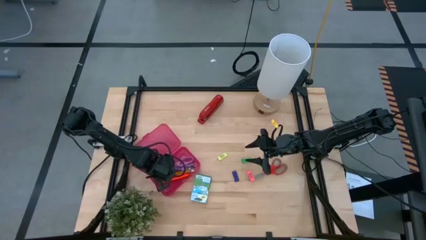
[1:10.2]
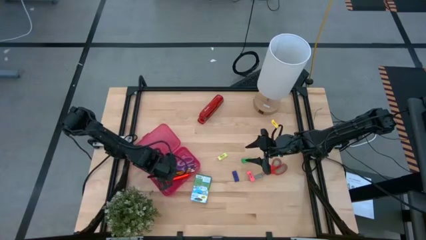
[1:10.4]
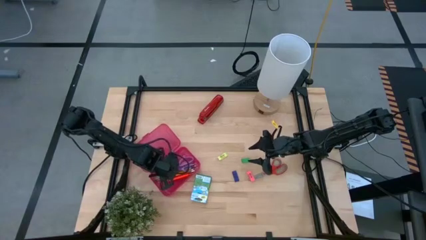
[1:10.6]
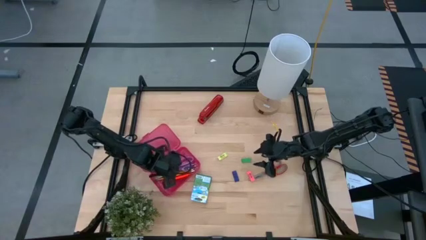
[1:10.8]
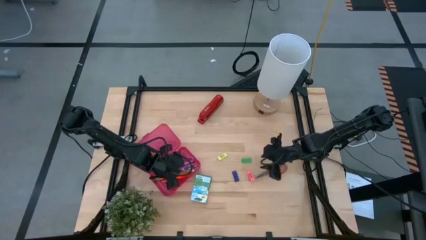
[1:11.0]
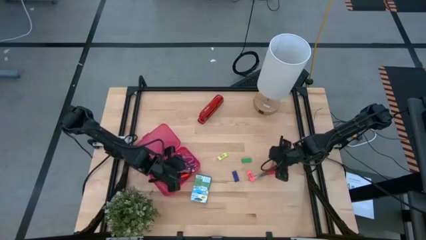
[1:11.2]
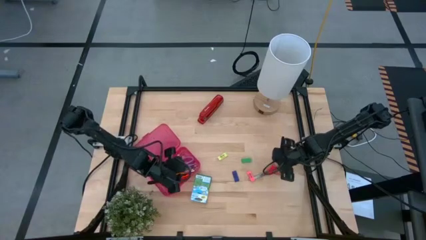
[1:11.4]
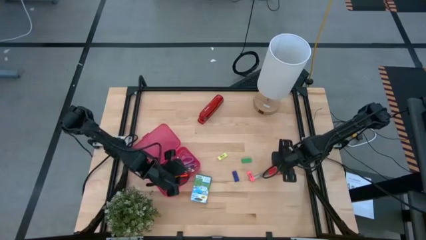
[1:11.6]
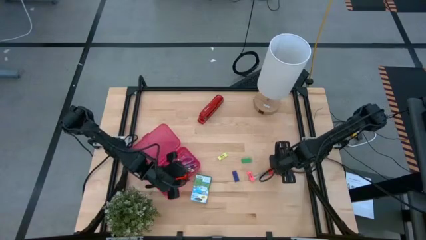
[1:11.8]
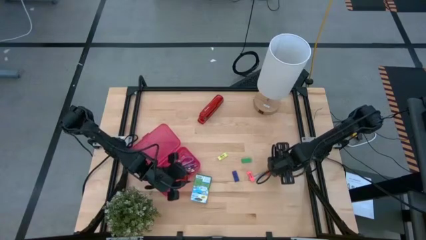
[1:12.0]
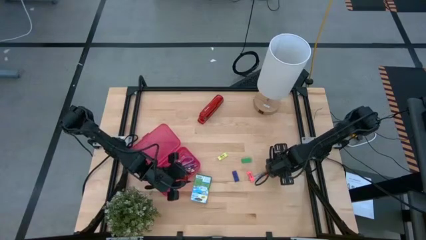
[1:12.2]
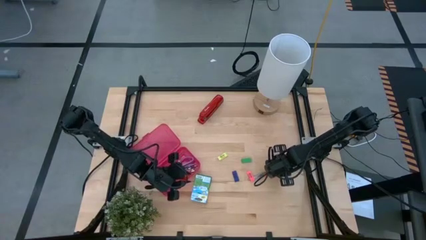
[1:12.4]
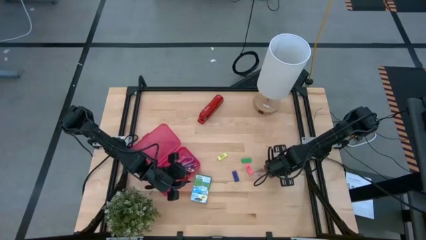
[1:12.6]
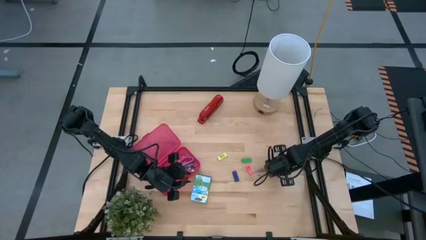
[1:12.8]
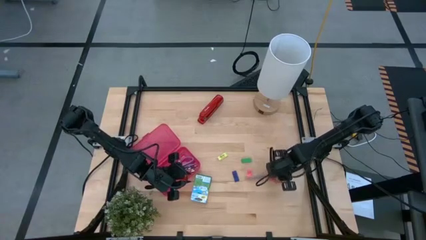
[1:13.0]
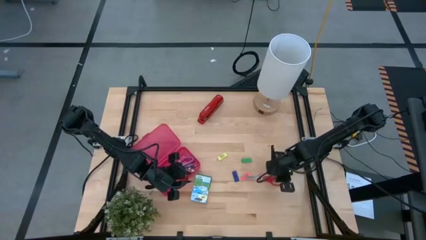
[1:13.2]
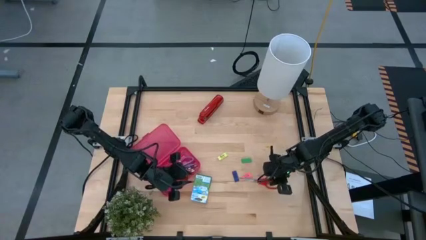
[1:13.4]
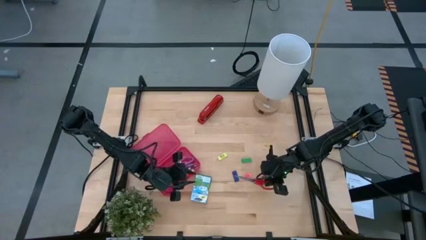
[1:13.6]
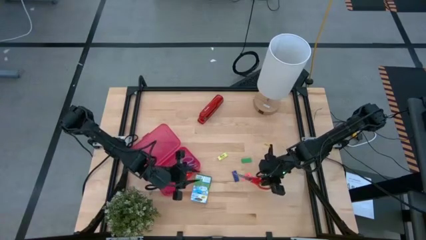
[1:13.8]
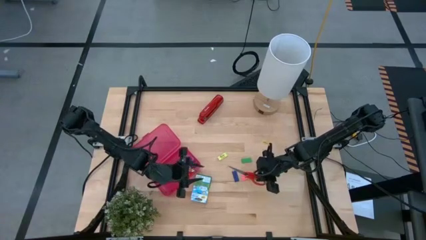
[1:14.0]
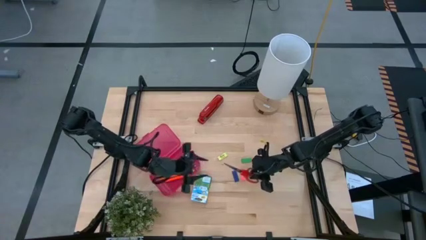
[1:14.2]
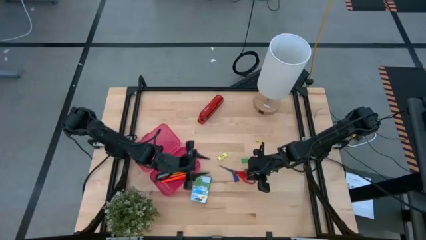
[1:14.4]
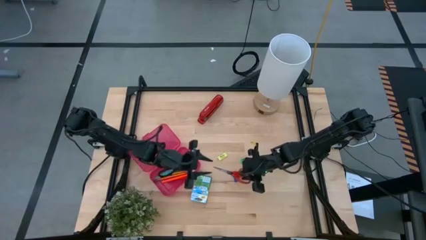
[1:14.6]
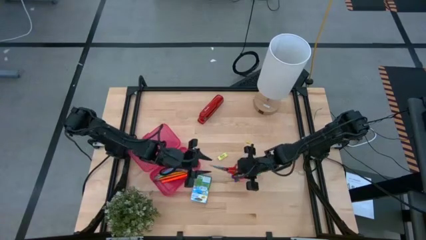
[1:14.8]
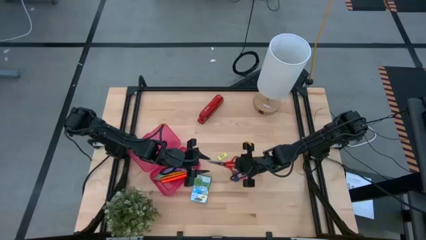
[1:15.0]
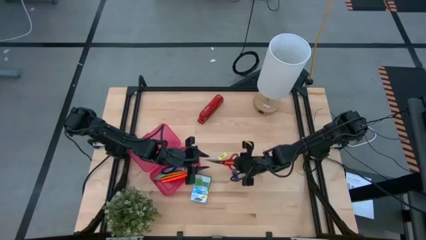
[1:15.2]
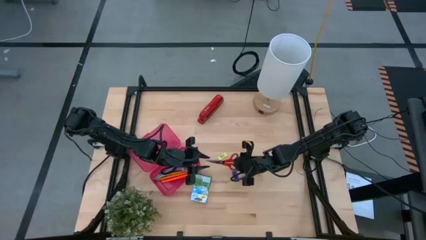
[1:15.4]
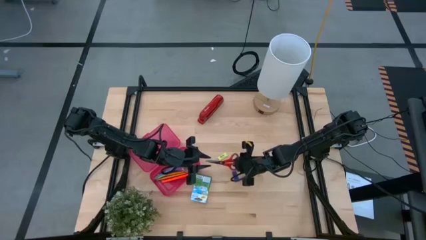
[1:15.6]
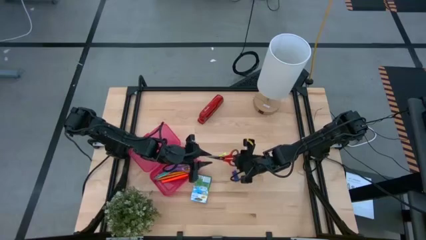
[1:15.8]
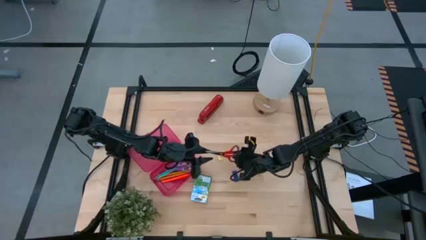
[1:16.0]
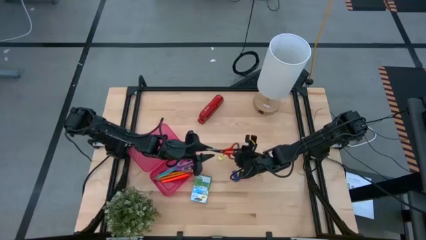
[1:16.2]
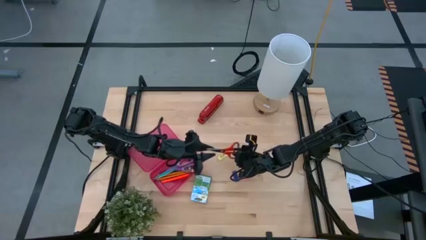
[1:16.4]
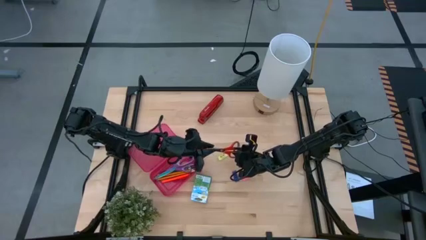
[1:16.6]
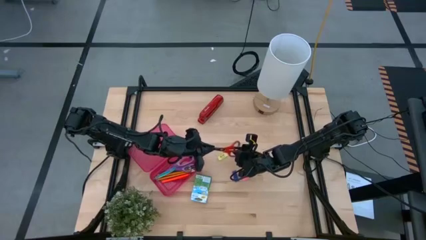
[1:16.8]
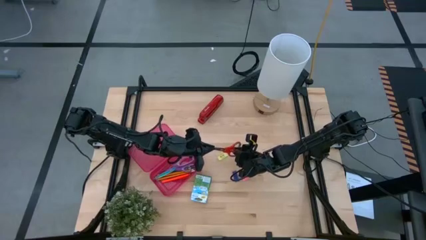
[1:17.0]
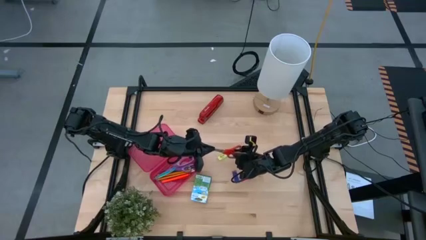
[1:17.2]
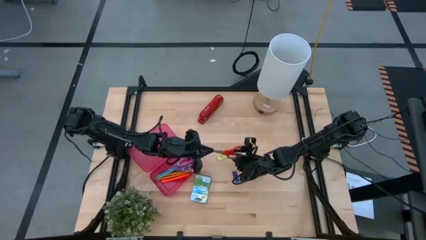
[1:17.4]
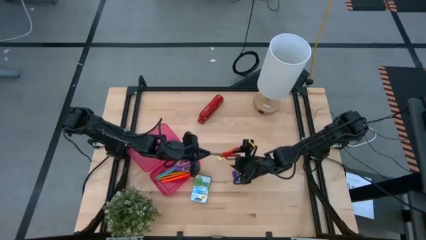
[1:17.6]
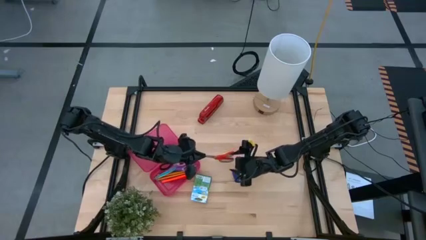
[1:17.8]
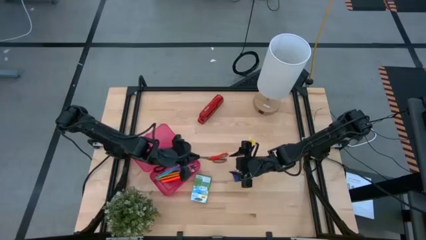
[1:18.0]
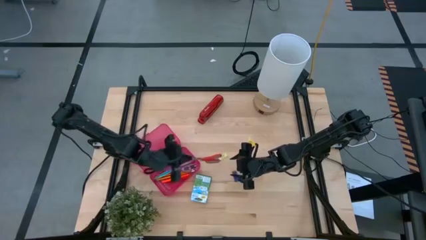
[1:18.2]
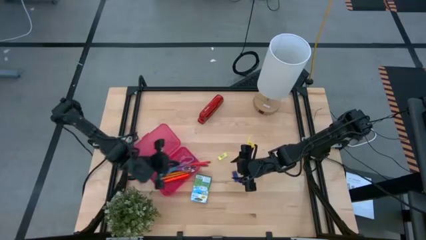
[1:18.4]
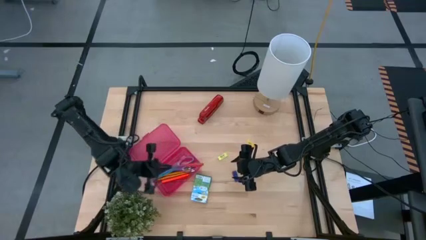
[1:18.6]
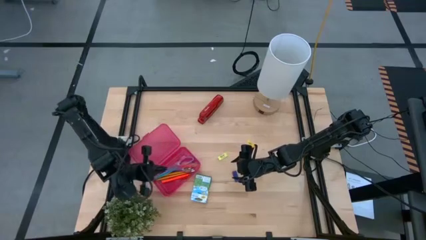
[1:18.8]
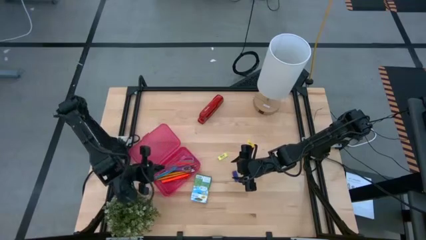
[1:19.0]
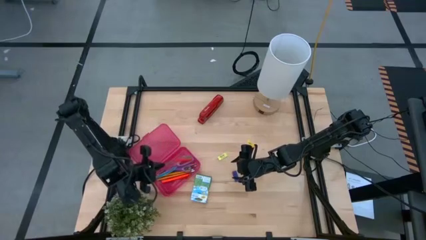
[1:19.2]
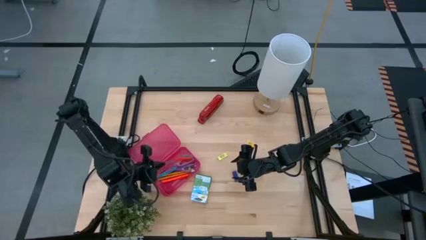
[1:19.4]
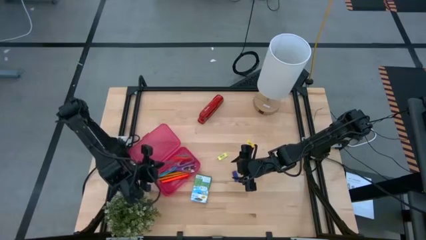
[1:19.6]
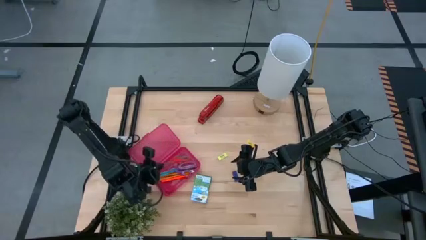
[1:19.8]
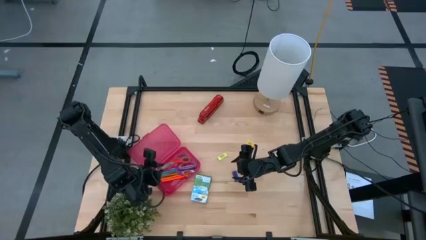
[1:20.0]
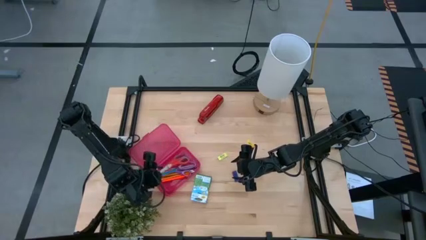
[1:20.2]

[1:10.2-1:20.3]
Task: Pack school essentials
Put the red scissors into the red supply box

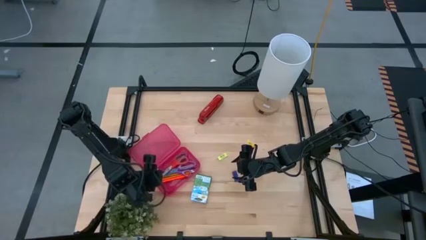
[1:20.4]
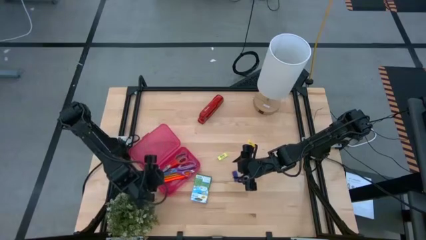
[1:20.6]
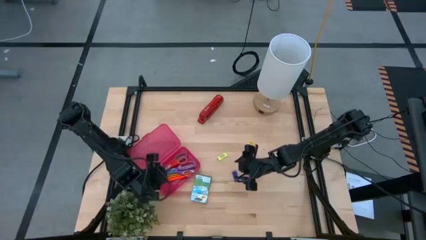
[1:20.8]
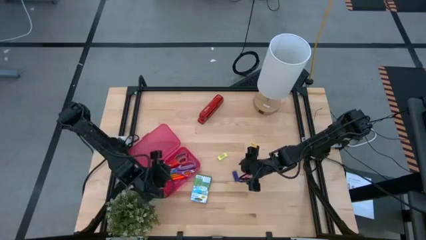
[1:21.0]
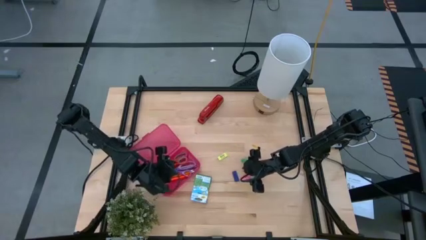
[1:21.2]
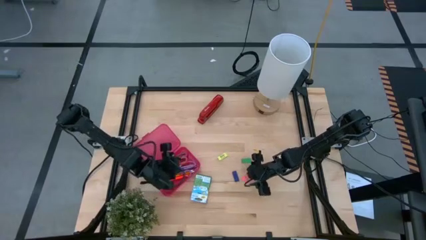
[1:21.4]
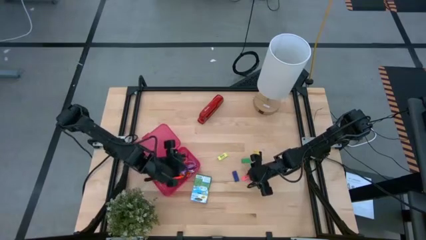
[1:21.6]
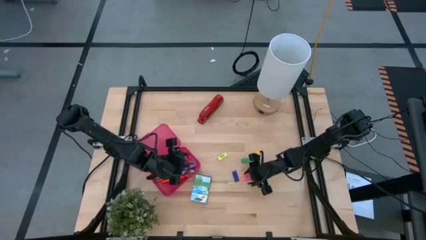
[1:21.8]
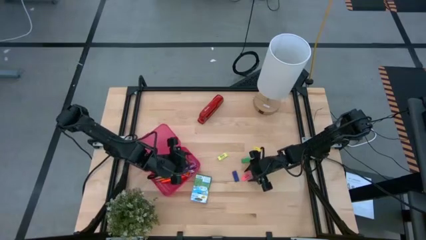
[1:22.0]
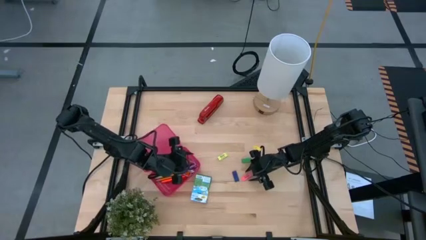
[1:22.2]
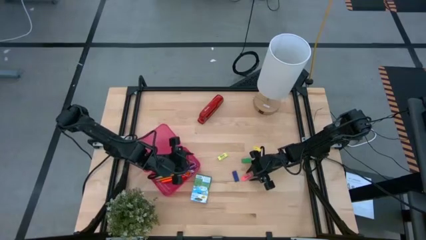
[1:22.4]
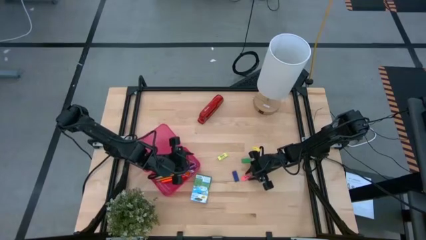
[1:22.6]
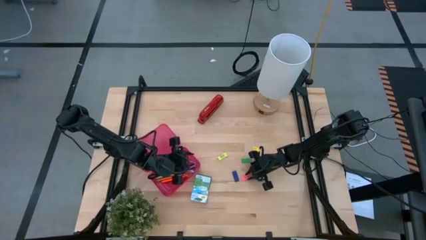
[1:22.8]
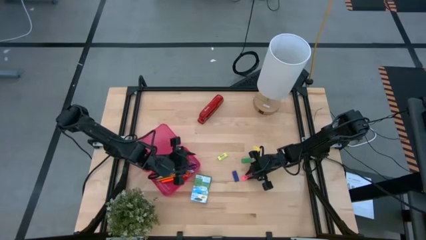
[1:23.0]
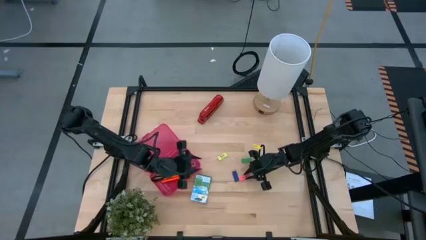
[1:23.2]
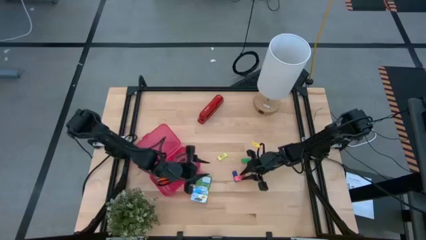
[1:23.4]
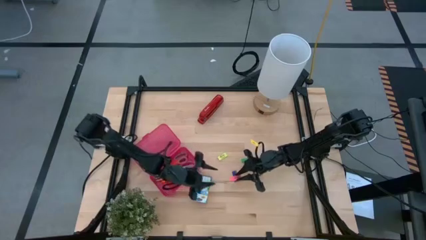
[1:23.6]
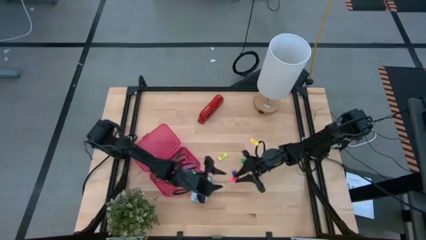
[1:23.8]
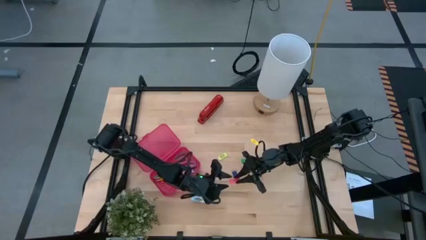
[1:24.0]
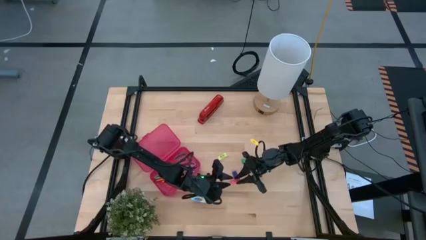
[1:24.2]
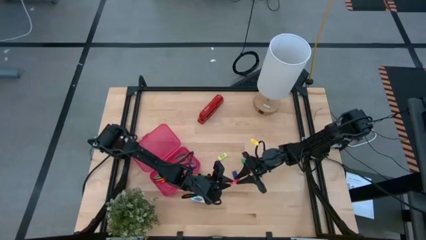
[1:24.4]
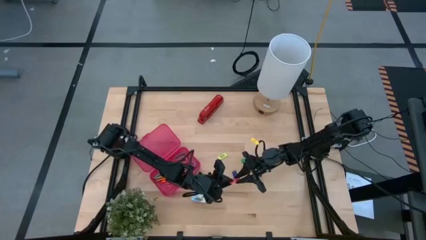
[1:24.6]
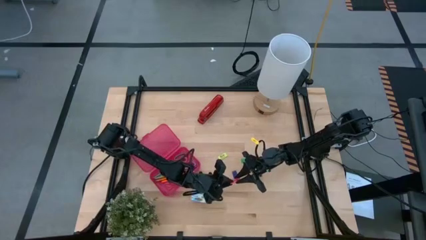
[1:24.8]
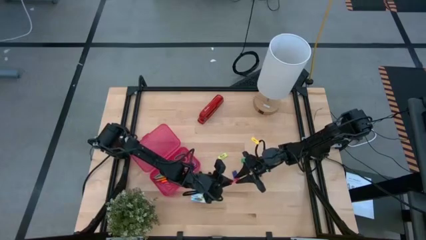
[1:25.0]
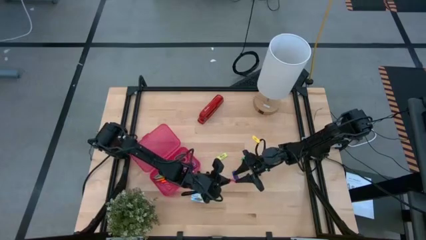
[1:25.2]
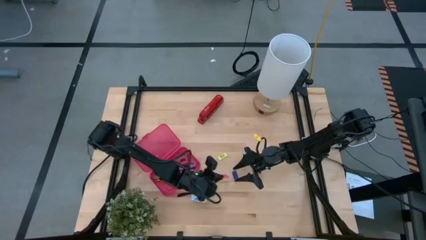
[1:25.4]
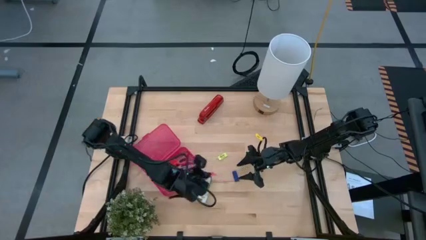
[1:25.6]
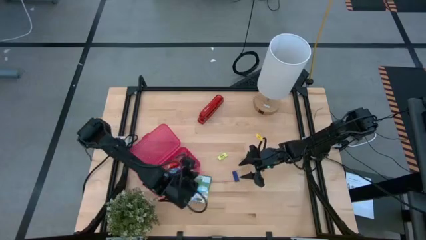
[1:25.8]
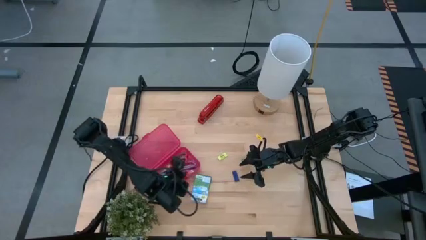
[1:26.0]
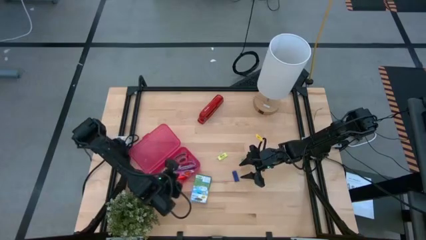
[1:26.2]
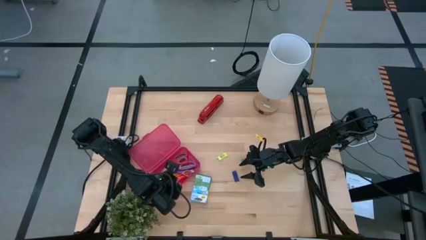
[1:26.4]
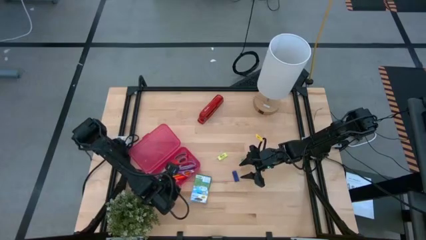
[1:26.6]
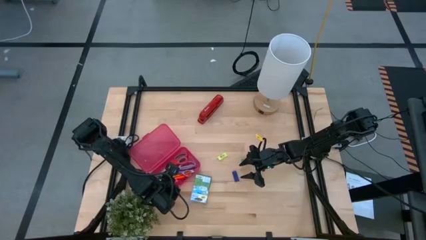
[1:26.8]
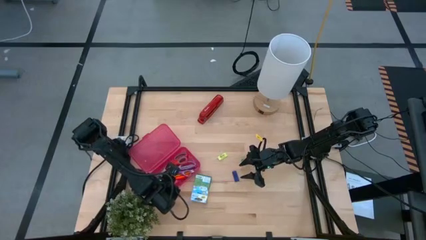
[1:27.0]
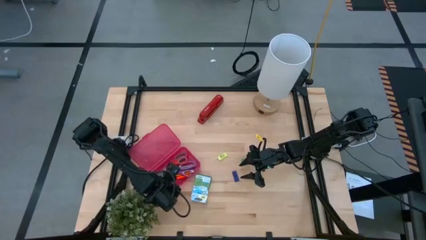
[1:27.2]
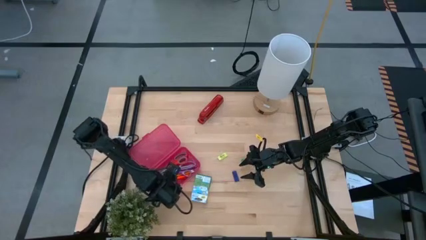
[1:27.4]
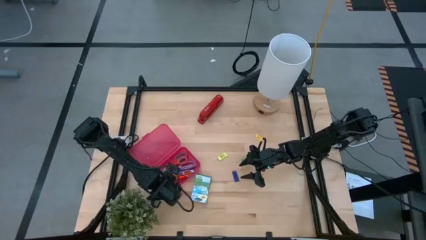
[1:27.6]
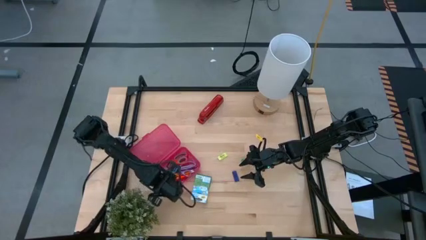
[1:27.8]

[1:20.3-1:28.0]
Put the pink eraser into the red supply box
